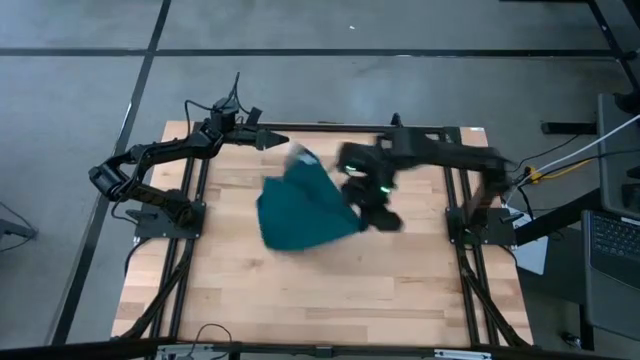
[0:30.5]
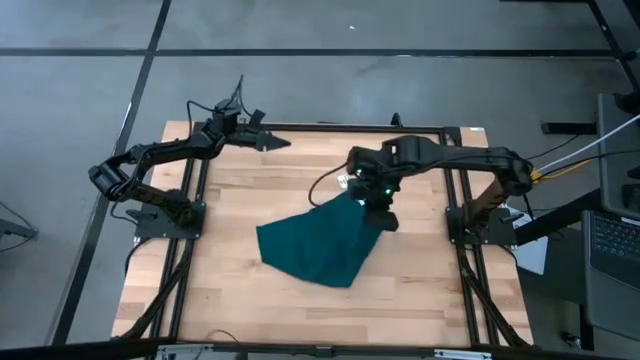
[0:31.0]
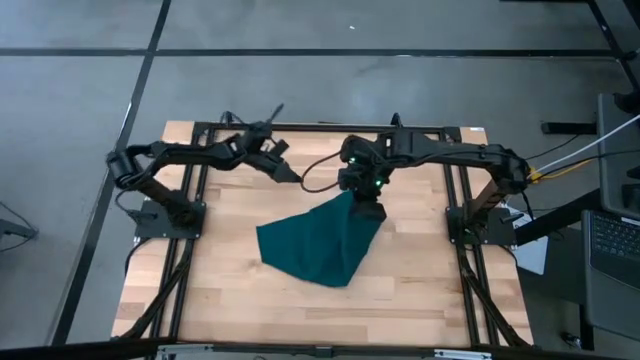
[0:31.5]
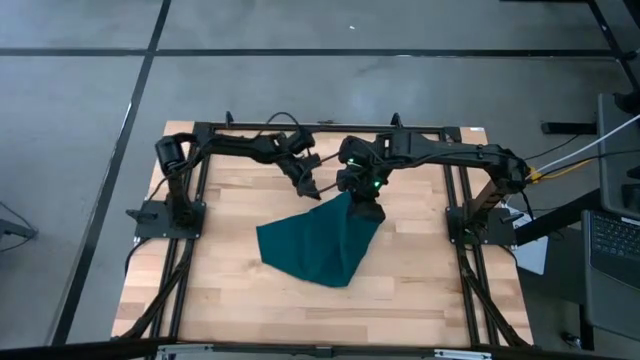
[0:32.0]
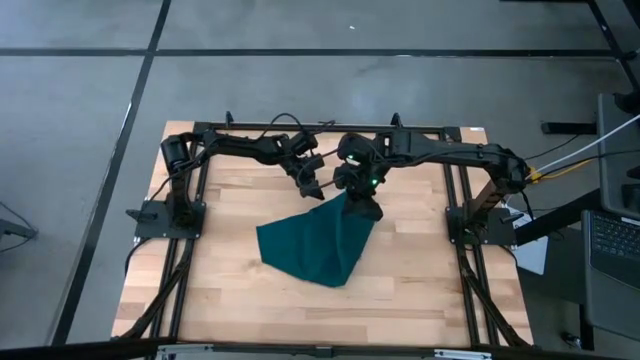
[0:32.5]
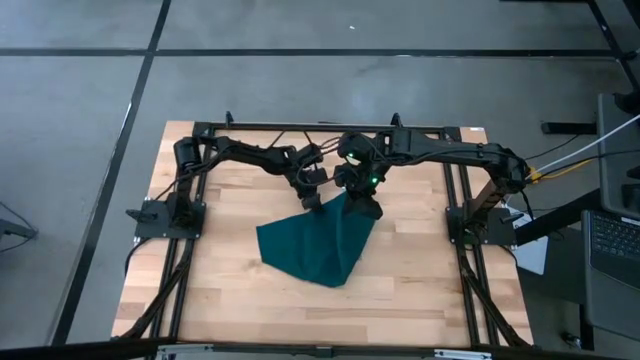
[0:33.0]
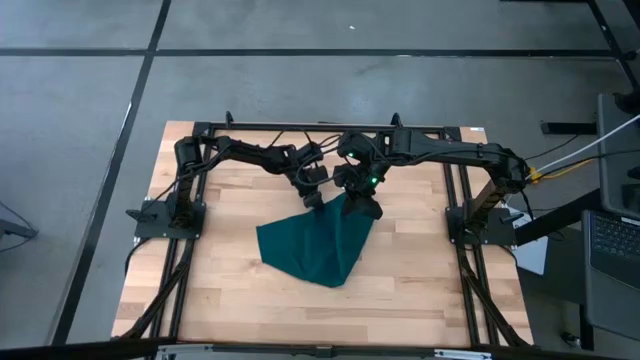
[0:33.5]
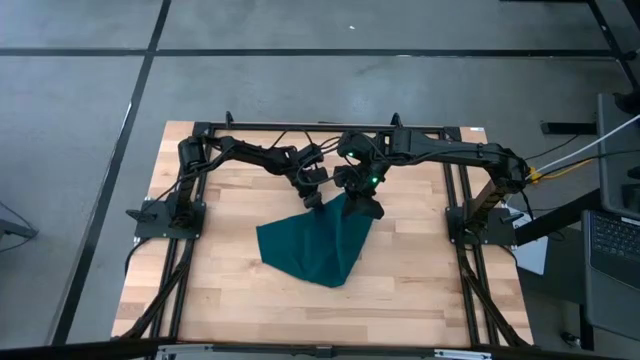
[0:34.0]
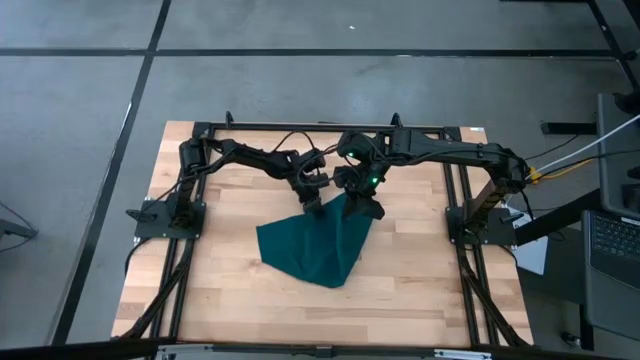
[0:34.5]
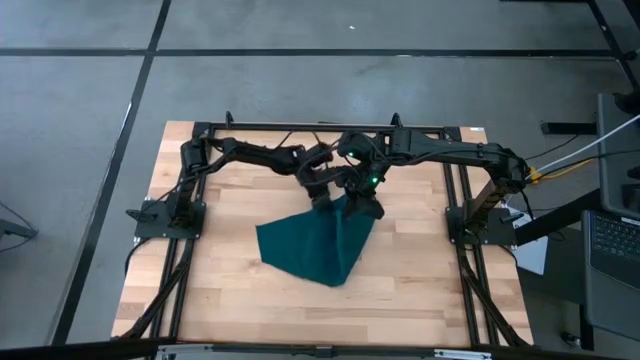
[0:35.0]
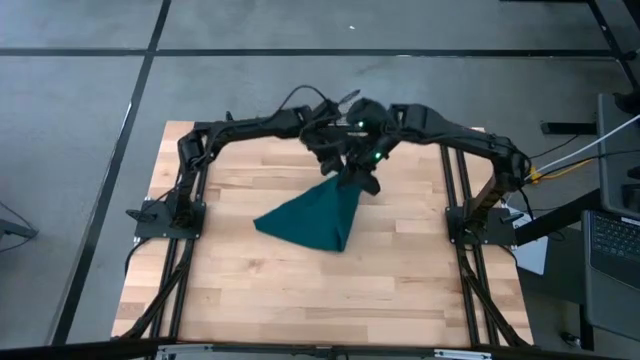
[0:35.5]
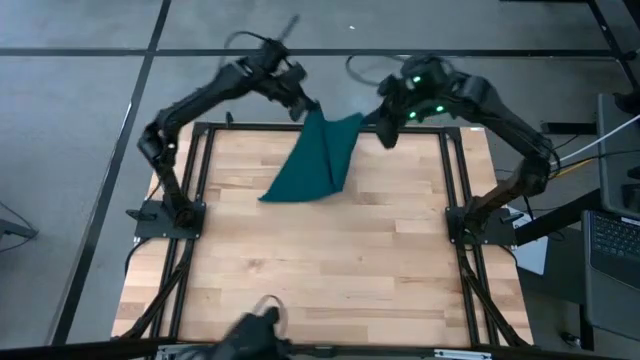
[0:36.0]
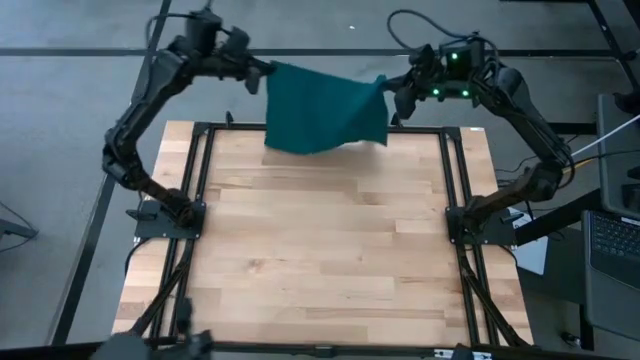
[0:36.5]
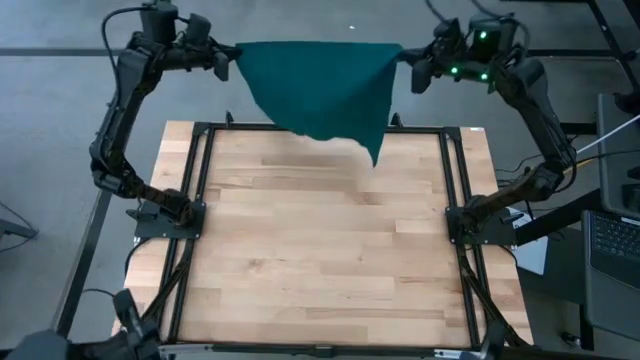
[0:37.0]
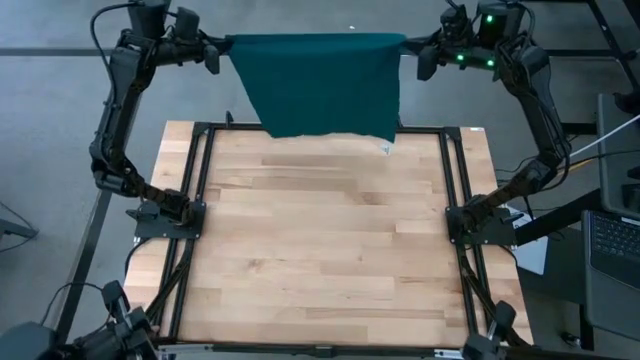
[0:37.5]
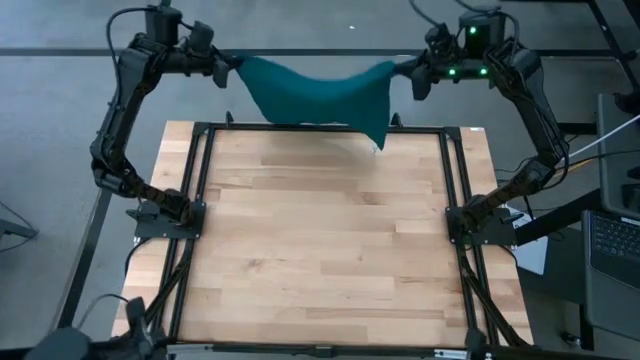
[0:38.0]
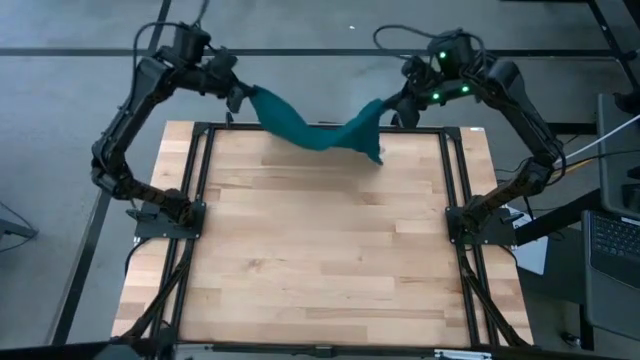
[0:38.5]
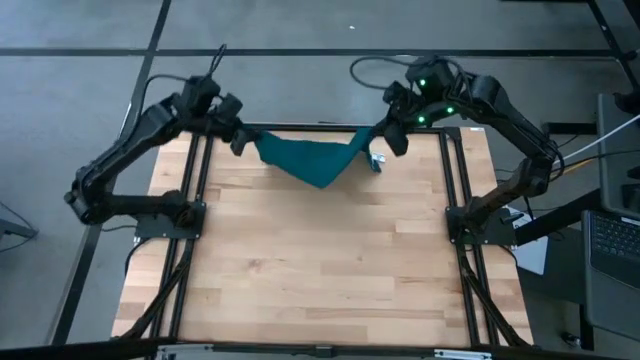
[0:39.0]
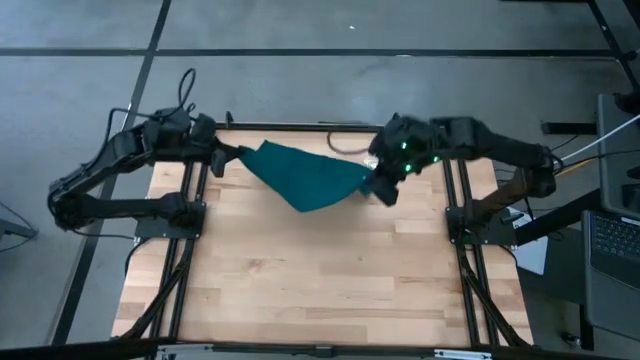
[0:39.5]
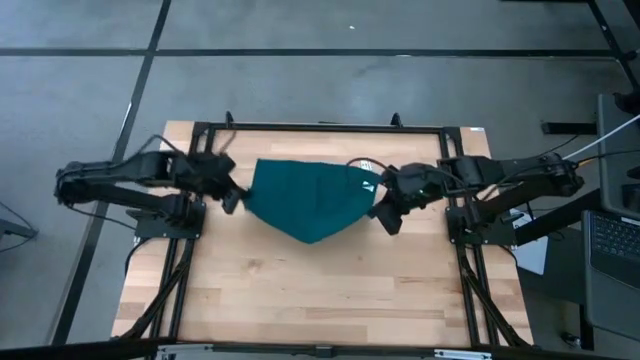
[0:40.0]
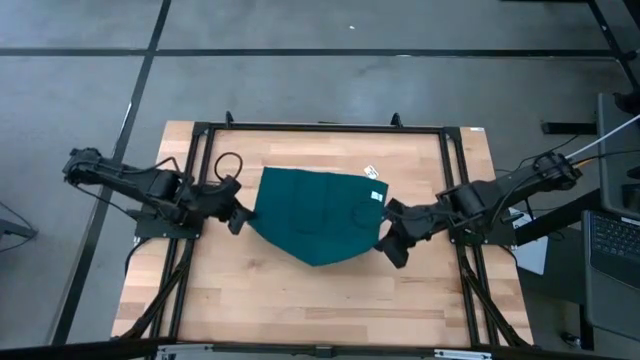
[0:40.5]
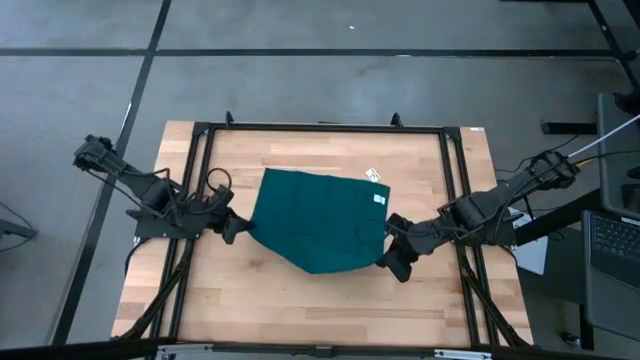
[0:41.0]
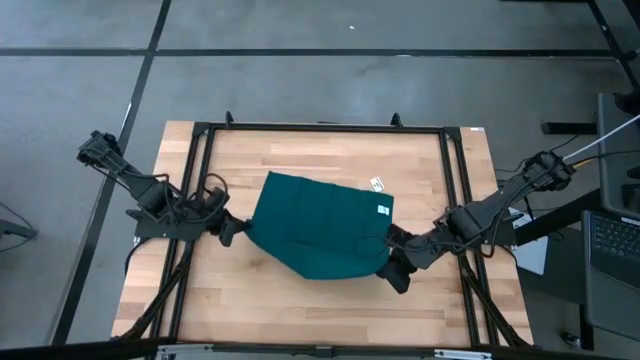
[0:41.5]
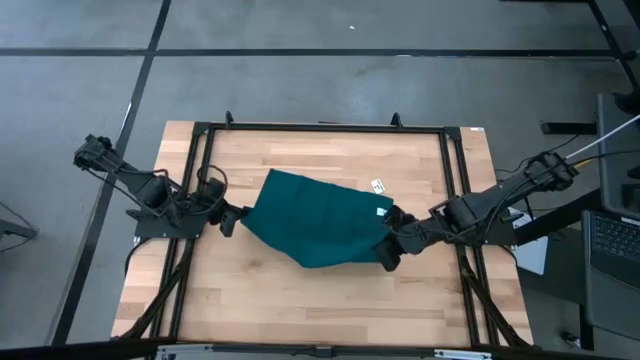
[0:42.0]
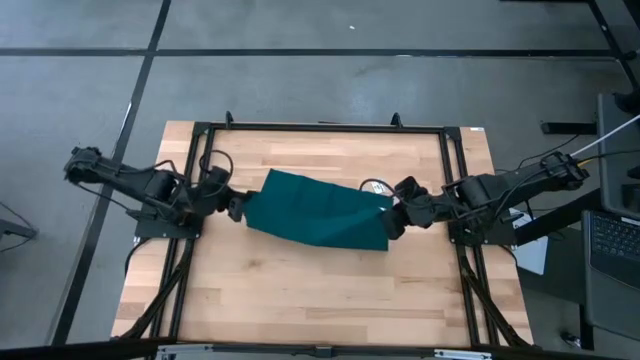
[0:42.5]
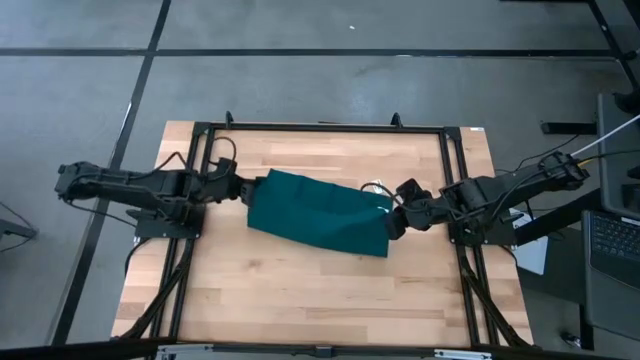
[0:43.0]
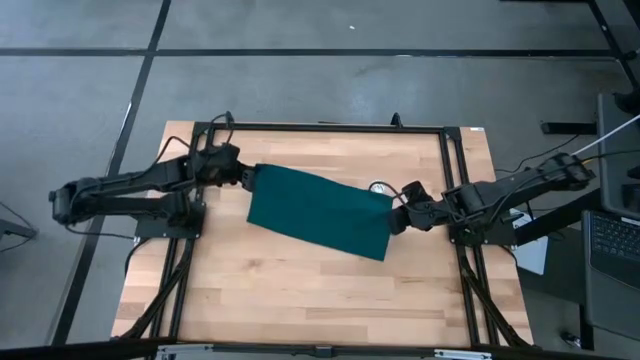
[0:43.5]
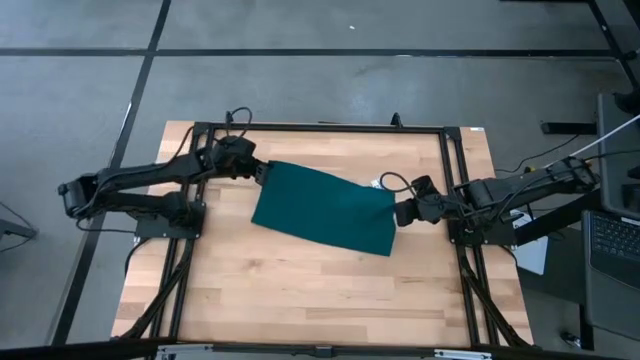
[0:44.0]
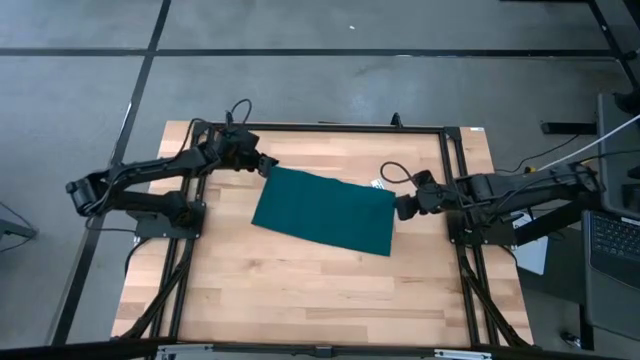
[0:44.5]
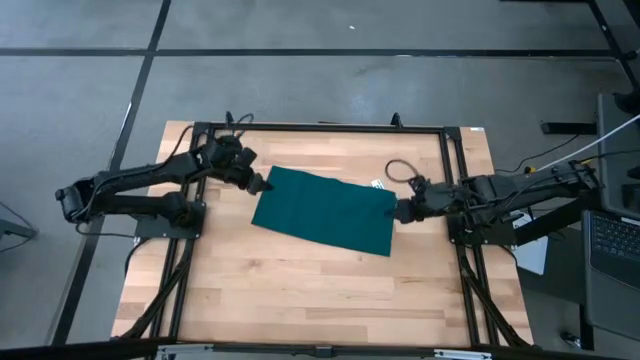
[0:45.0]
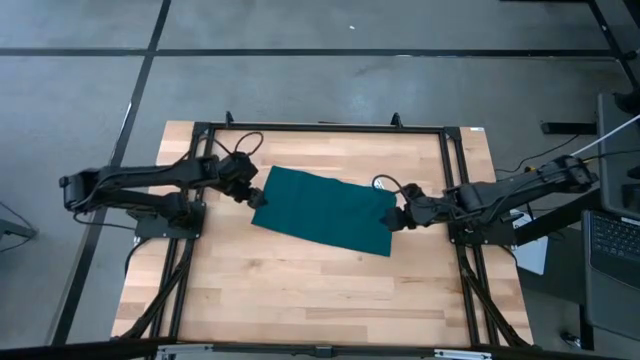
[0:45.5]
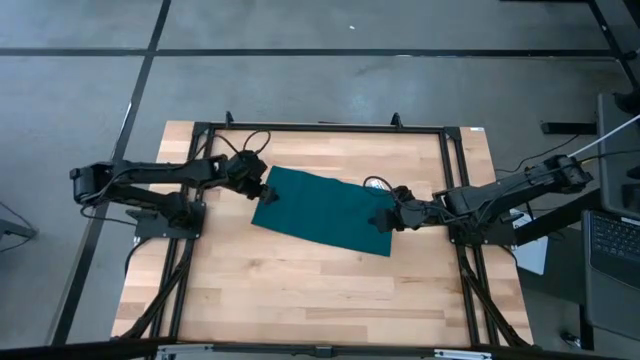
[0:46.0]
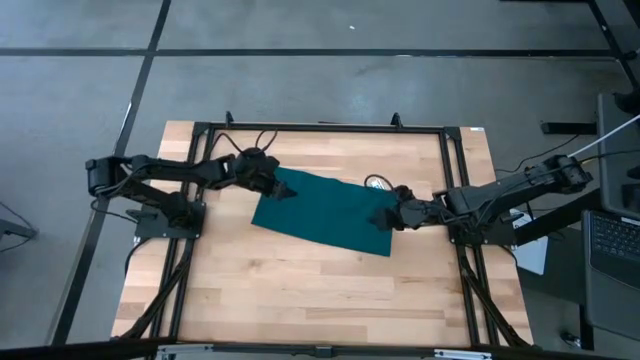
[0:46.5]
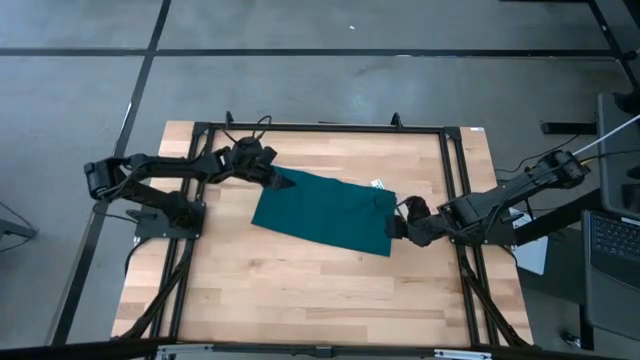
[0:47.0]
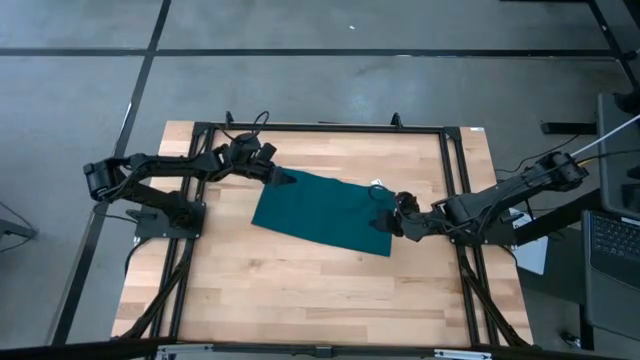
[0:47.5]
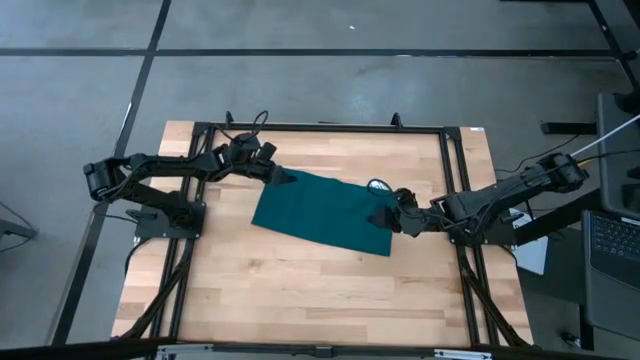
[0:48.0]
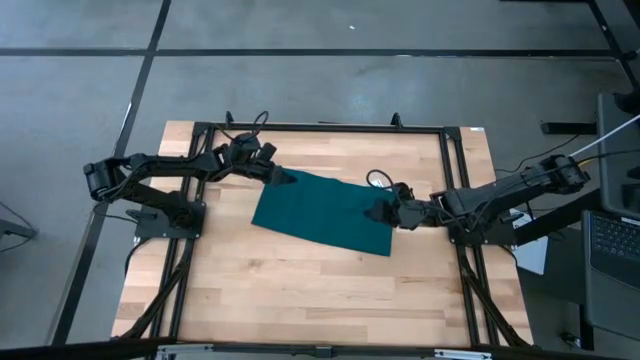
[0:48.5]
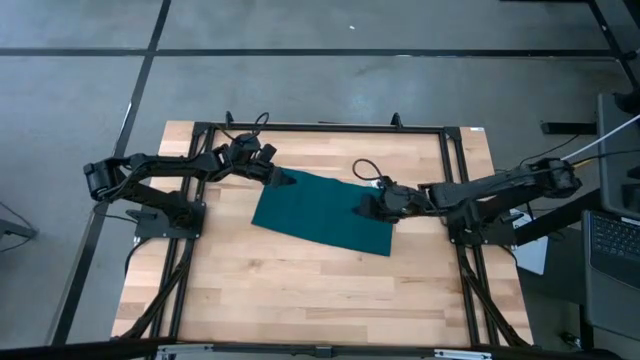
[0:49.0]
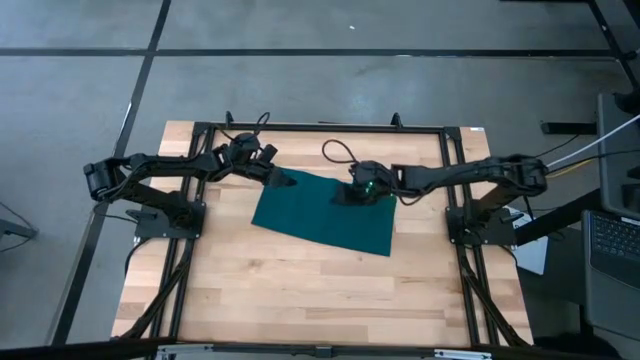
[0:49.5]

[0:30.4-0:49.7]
Task: Fold microfiber towels
Fold the dark green napkin

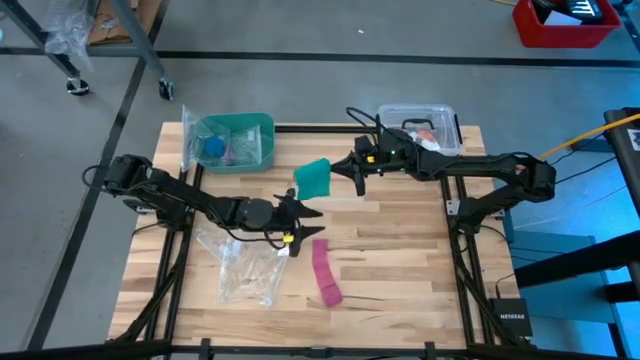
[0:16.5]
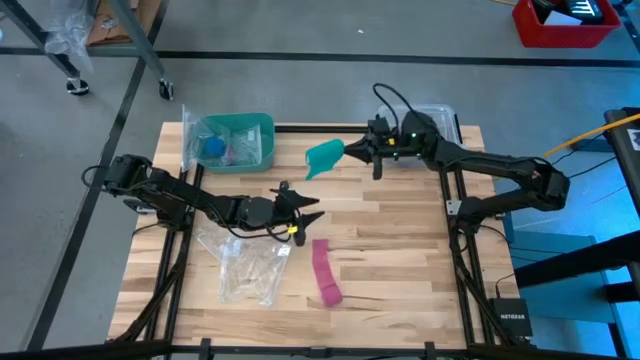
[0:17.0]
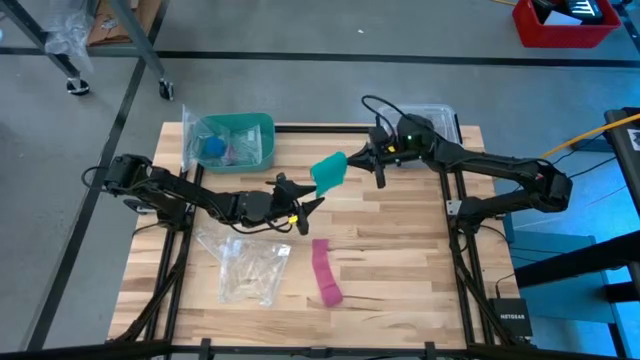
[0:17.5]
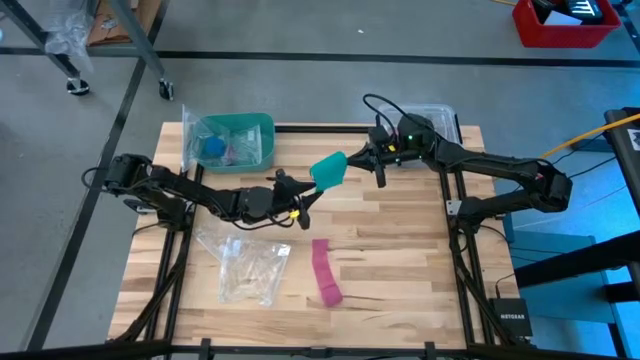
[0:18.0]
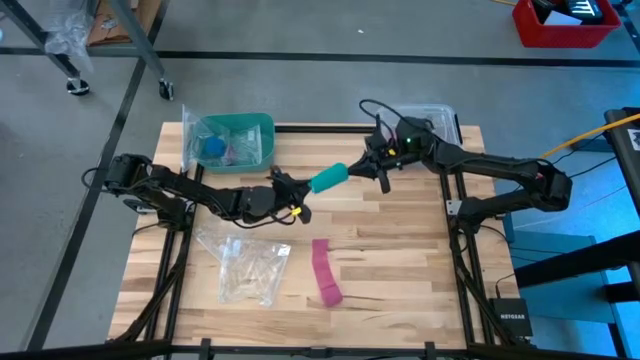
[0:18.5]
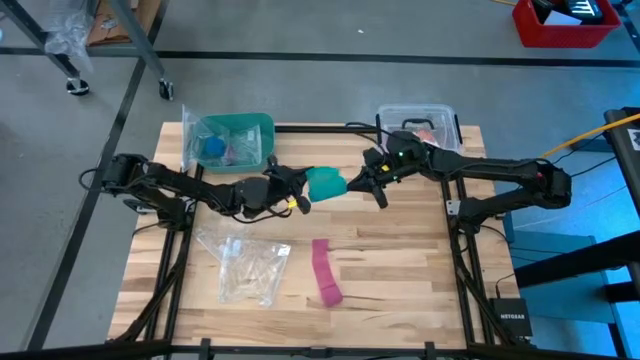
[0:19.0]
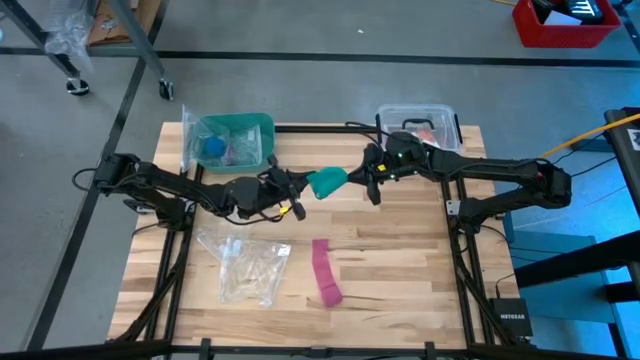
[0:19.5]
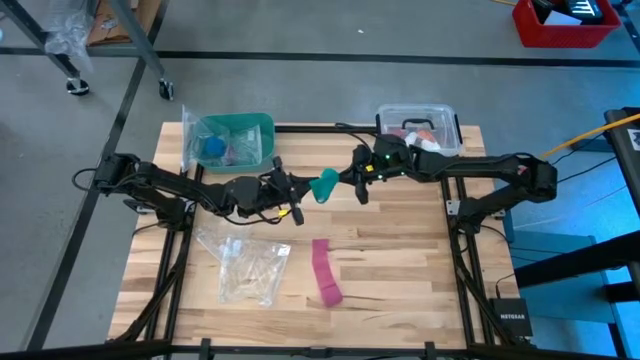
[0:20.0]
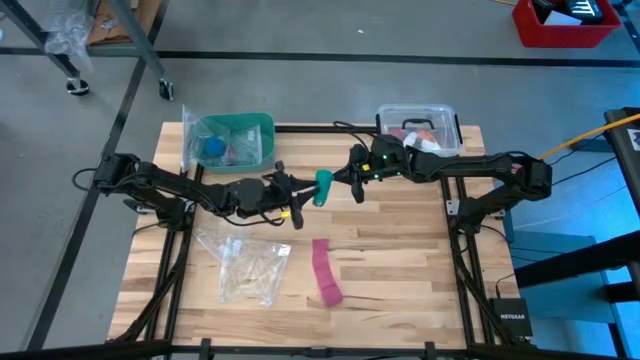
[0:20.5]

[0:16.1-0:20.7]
Task: Roll bandage
Roll the green bandage
